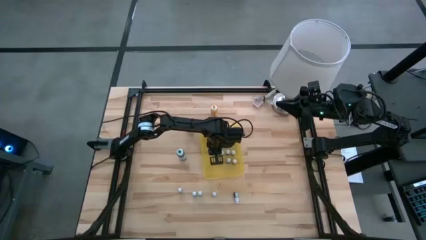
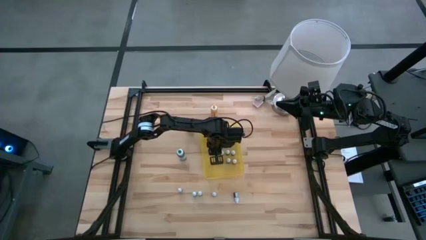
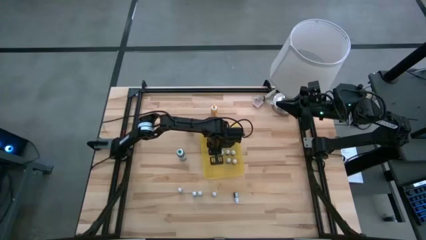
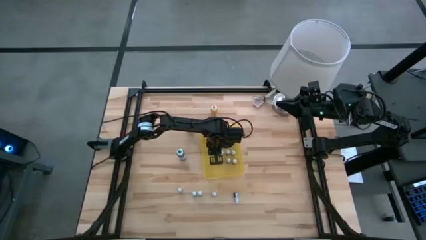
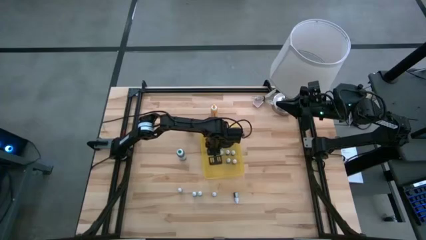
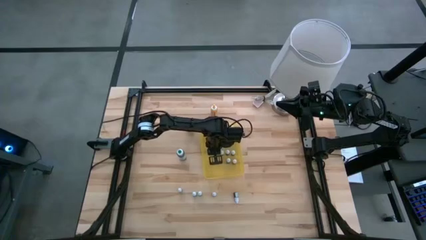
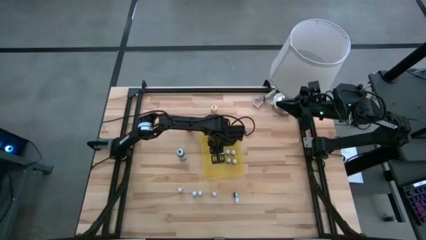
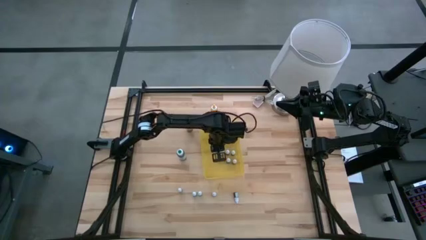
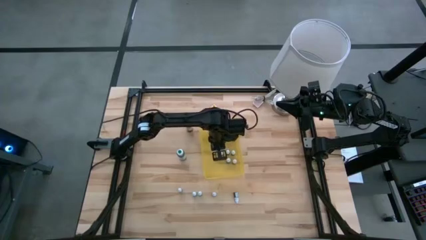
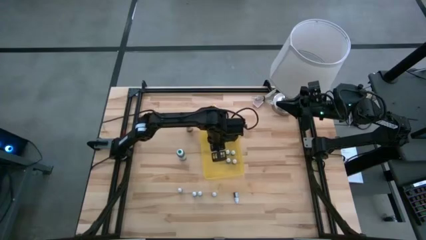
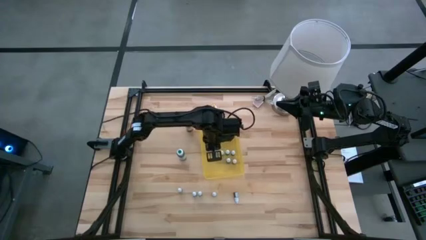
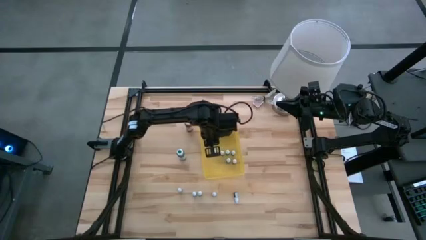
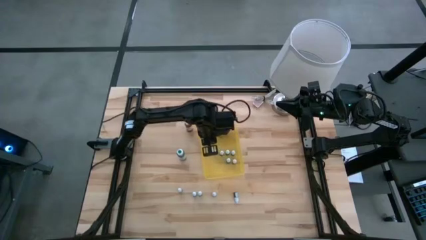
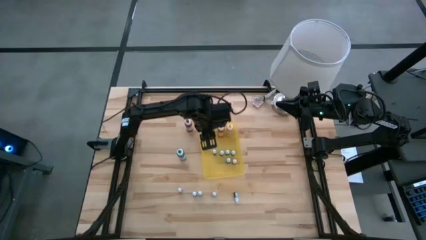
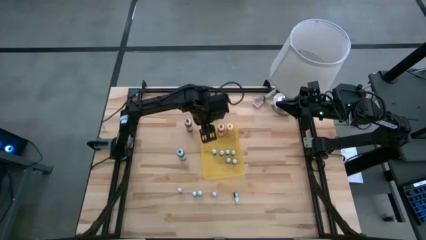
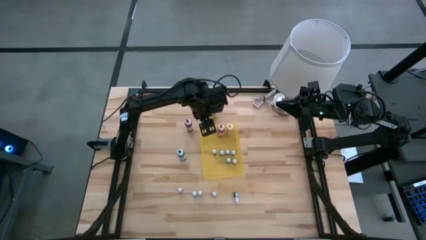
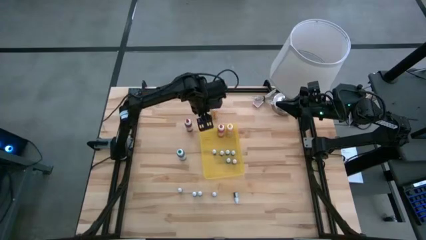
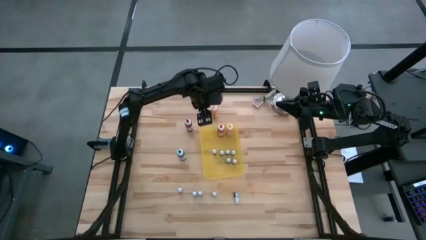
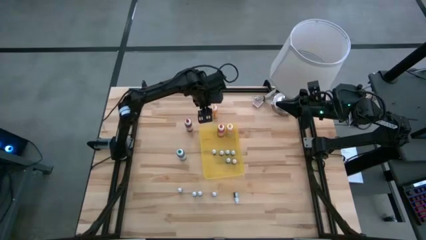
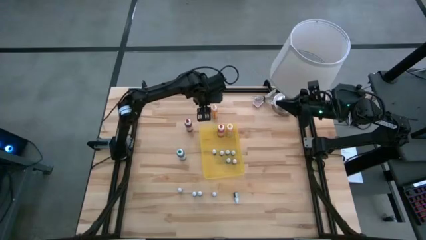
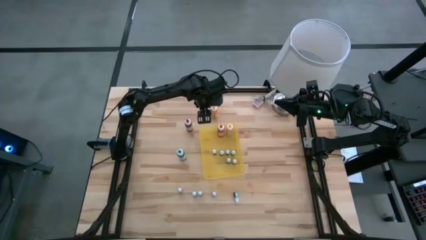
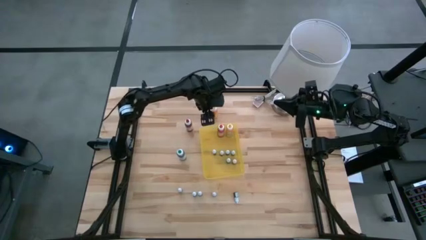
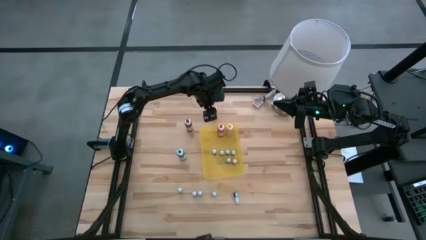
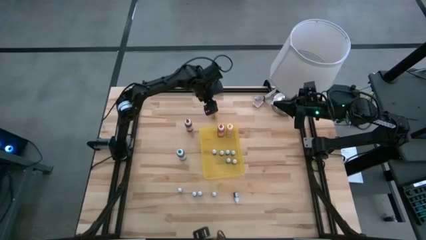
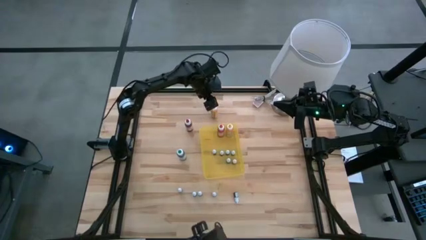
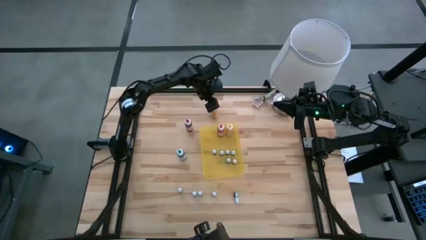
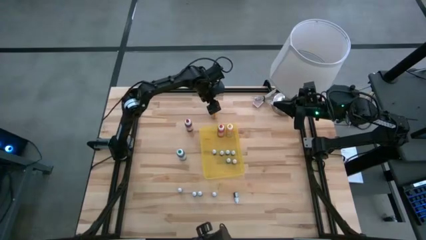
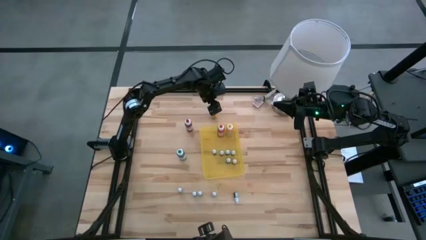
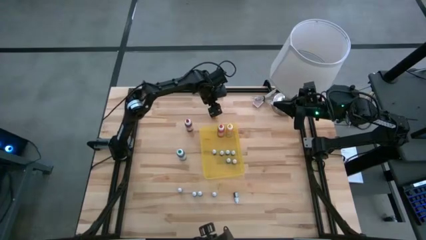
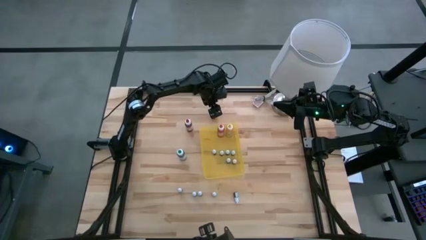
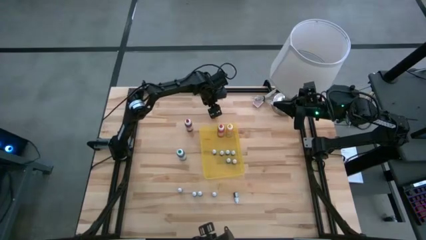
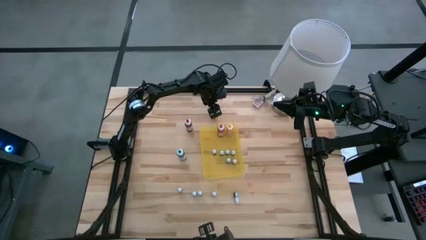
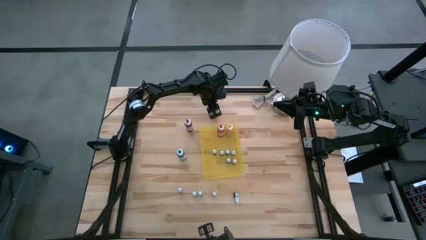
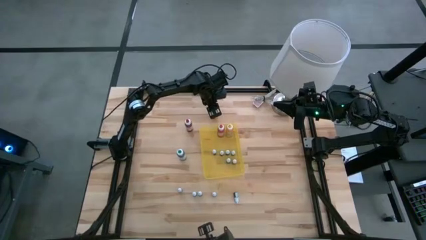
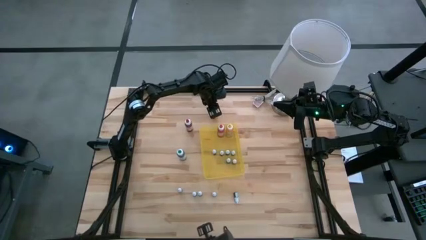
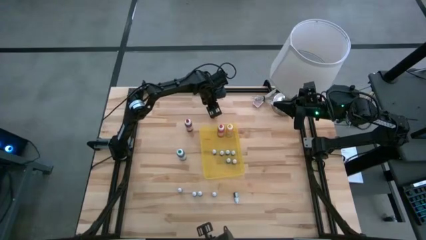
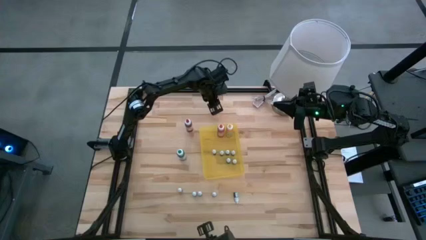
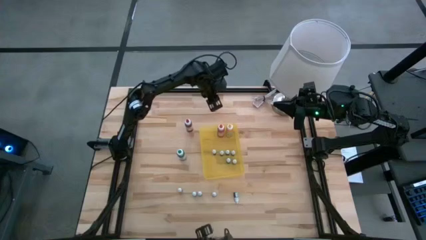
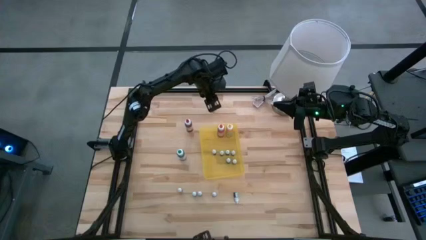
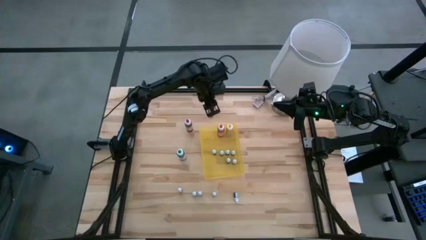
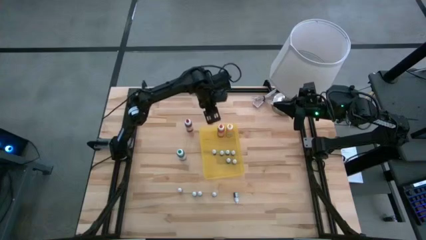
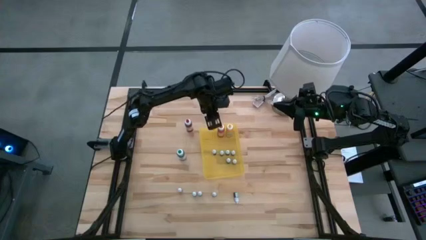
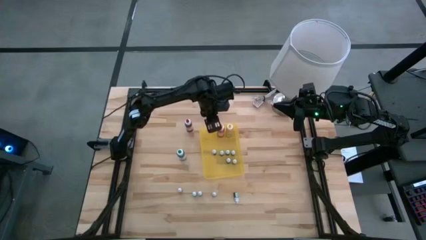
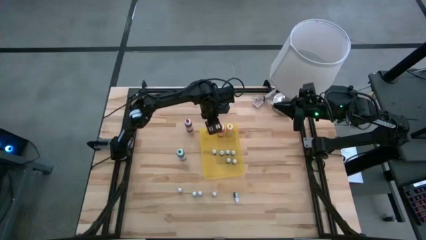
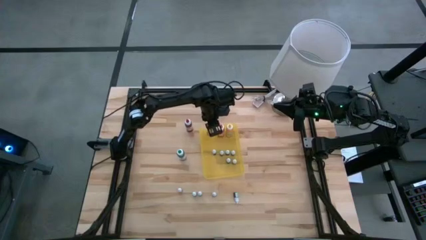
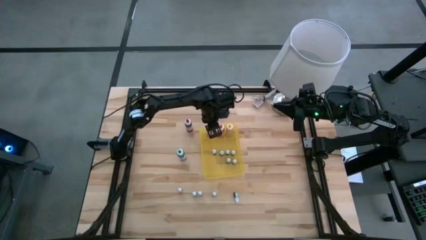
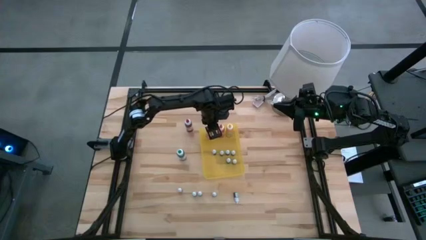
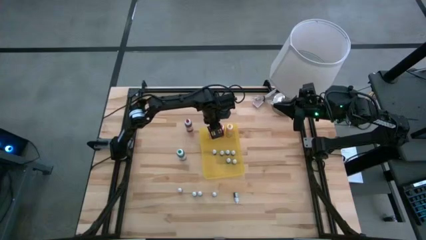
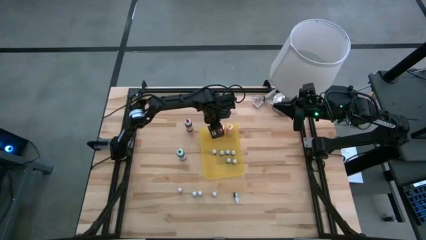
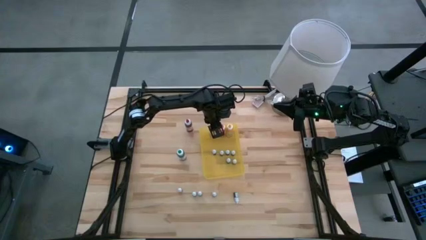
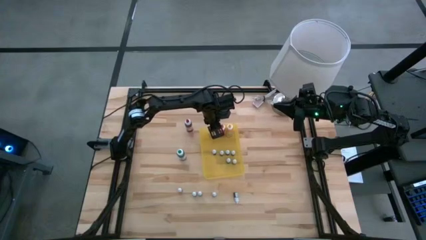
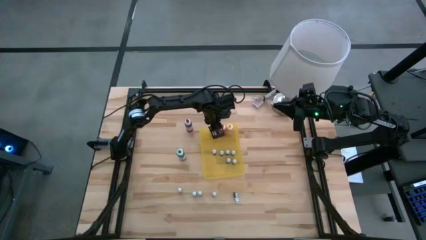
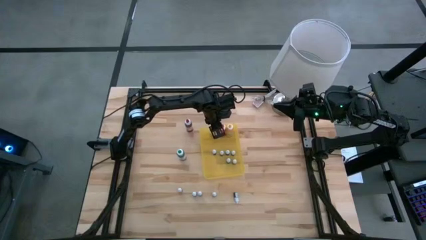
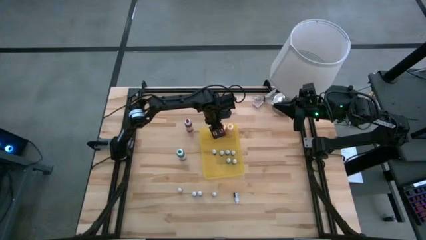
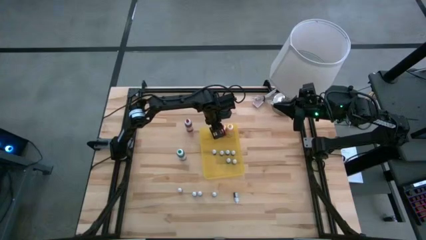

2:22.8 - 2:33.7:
Task: Pick & Place food coloring
Put the large yellow food coloring bottle into the bin

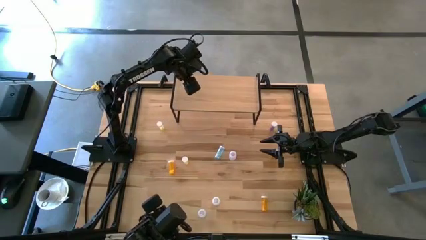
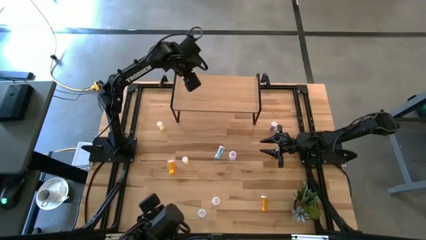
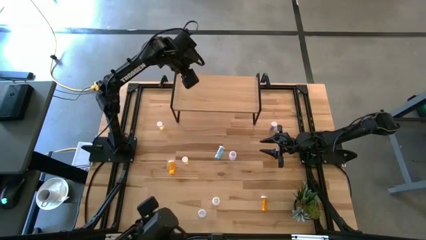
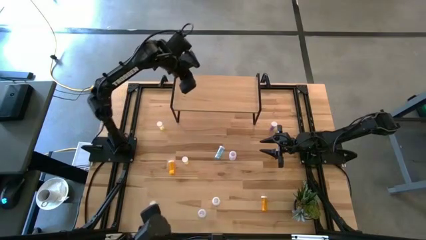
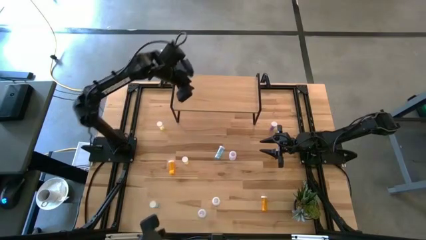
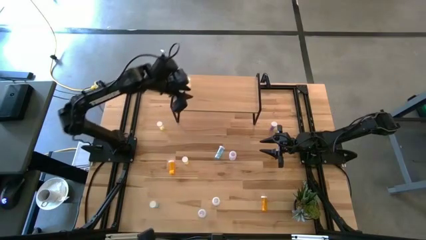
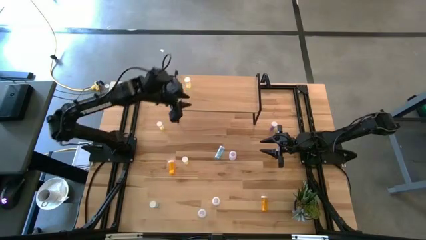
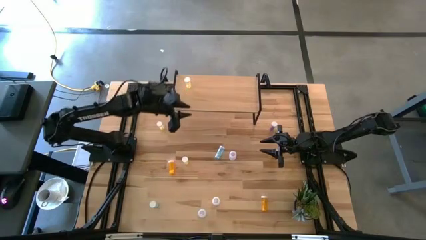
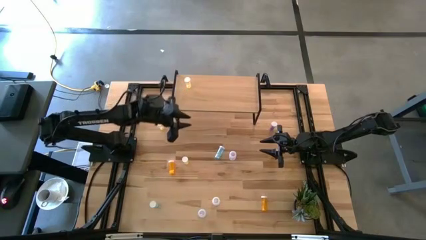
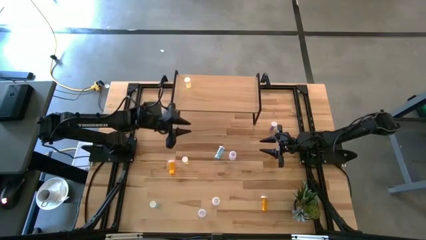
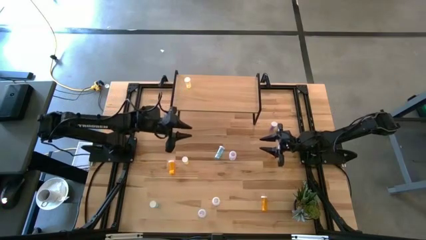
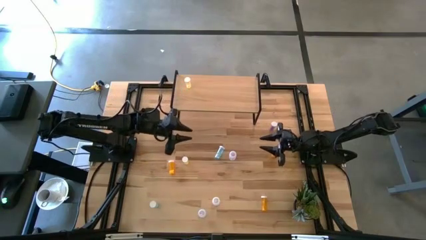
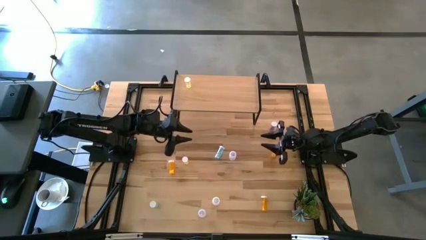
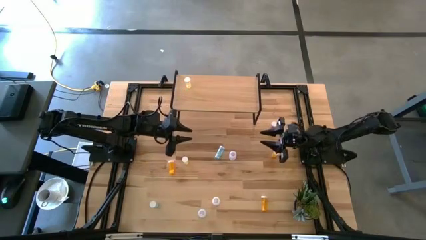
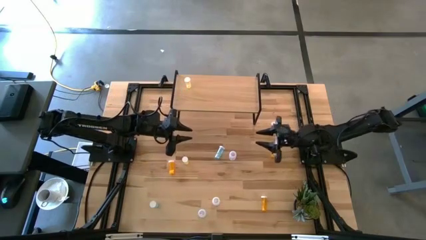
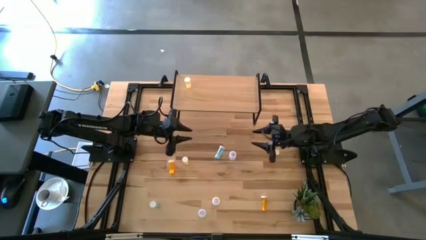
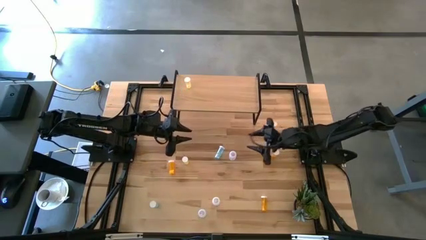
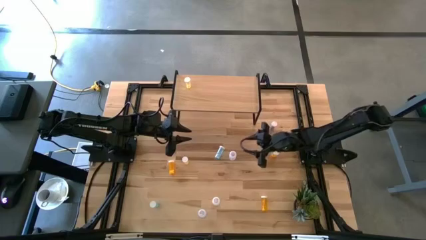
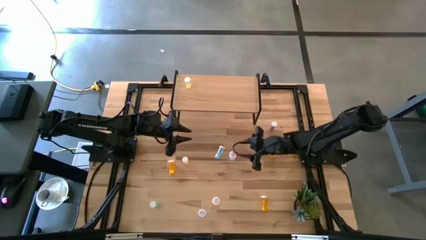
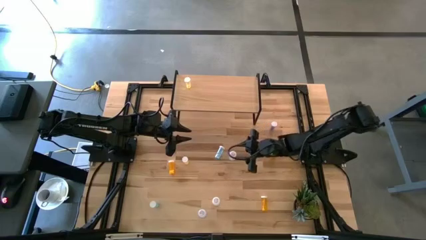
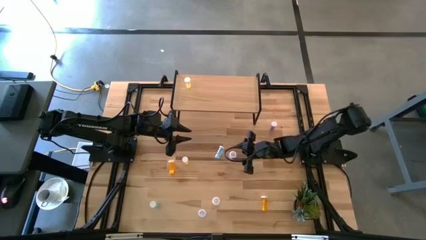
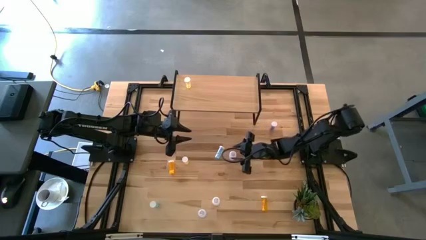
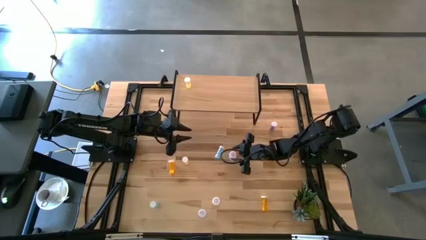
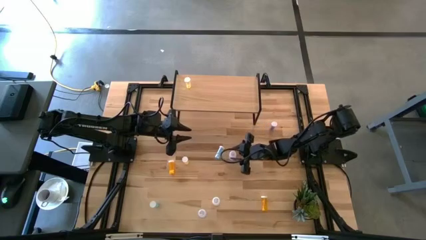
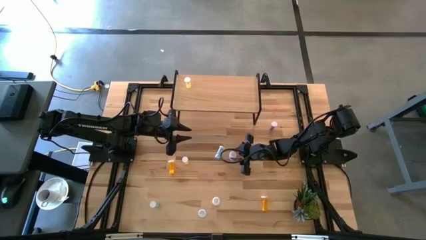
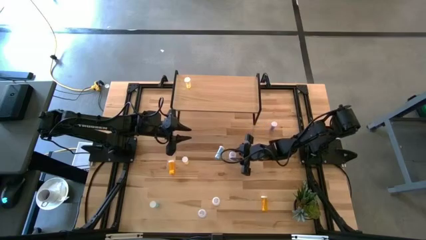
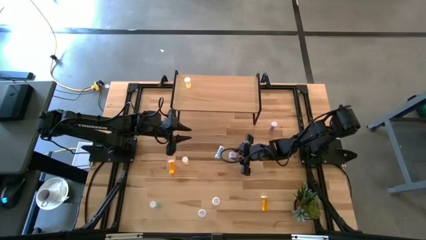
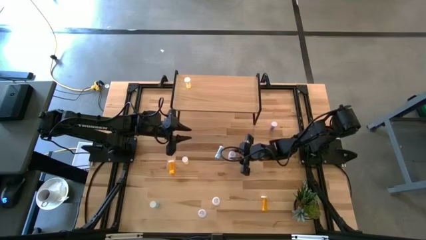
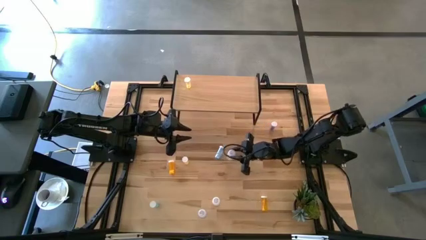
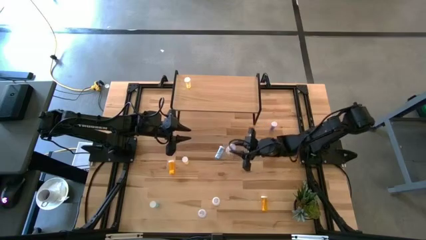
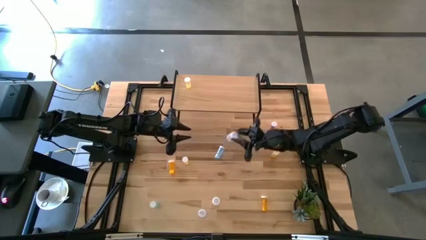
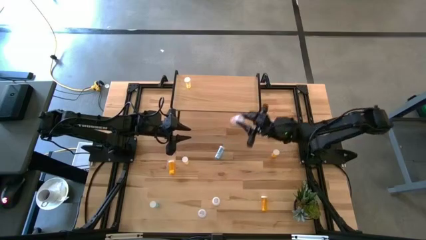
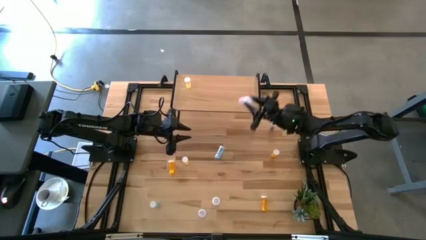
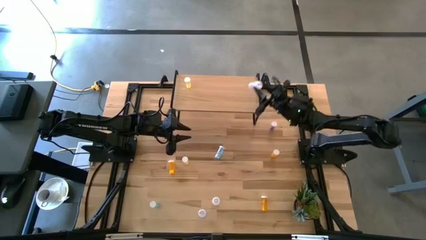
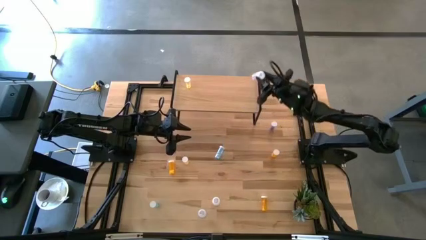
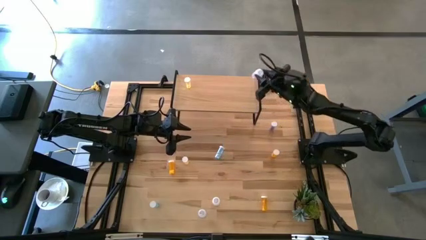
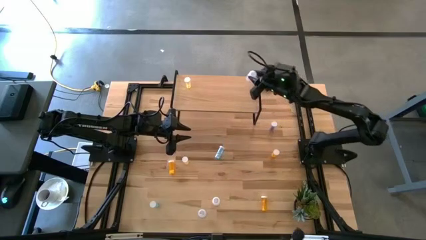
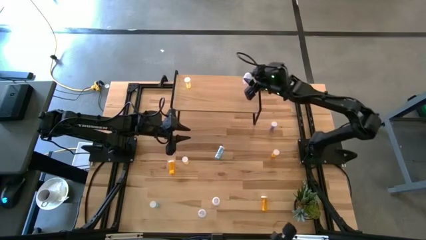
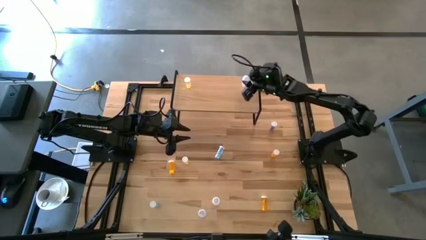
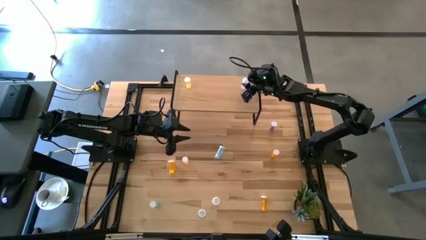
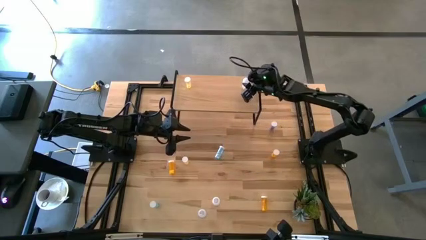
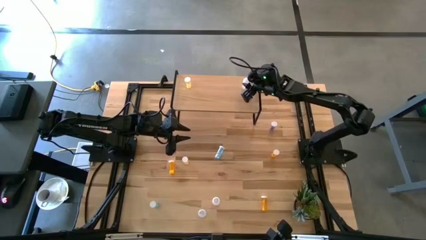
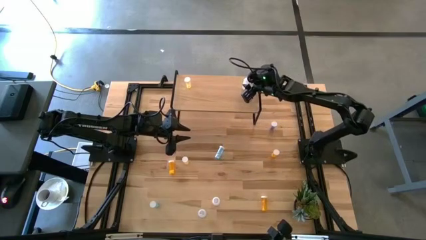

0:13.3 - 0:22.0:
Task: Pick and place medicine bottles onto shelf by color
Put the top transparent pill bottle on the shelf
